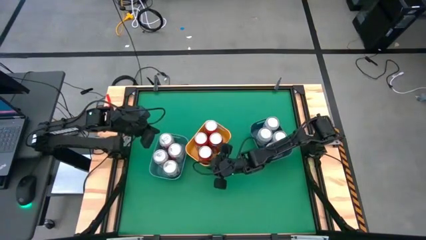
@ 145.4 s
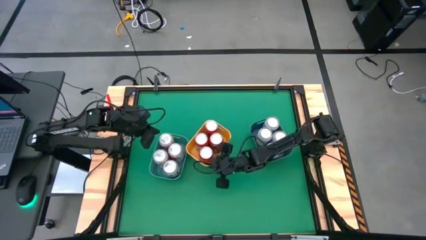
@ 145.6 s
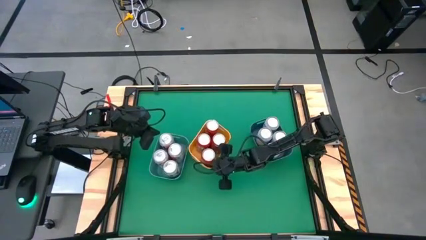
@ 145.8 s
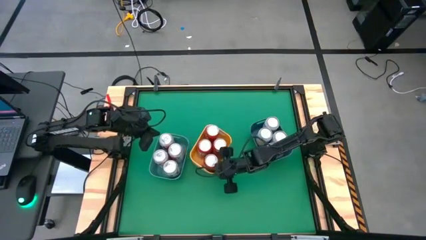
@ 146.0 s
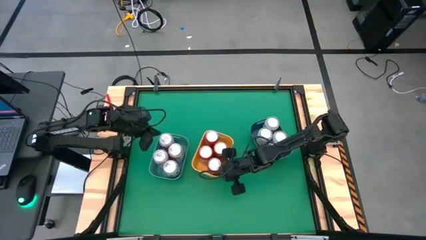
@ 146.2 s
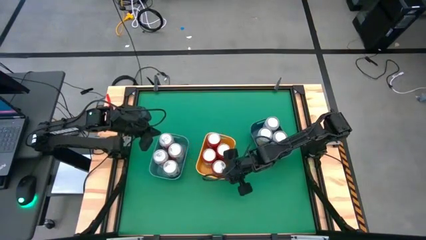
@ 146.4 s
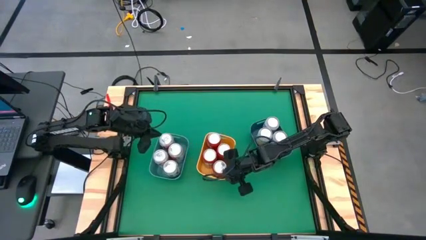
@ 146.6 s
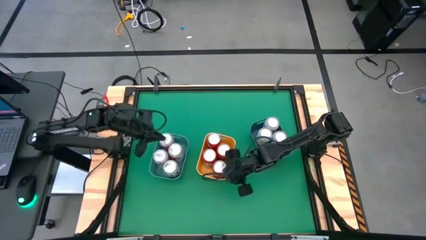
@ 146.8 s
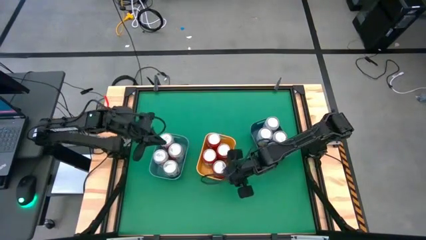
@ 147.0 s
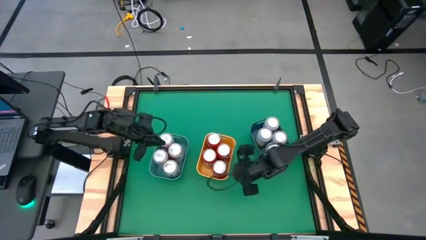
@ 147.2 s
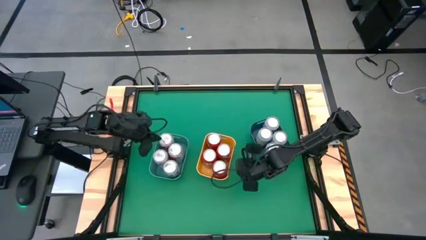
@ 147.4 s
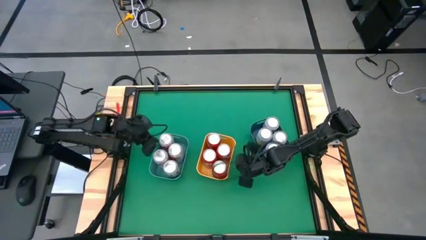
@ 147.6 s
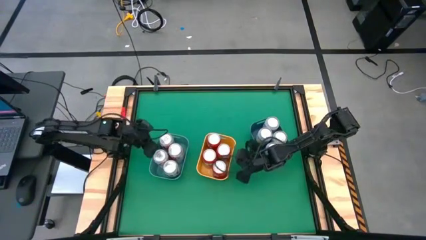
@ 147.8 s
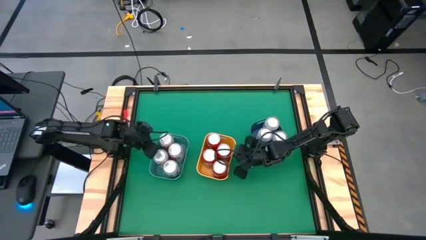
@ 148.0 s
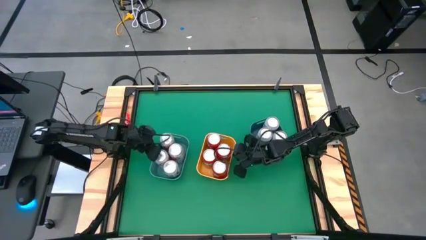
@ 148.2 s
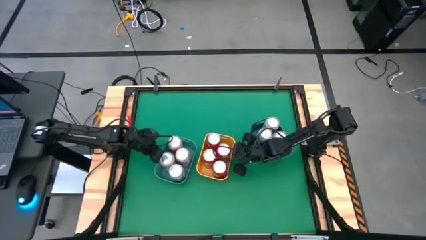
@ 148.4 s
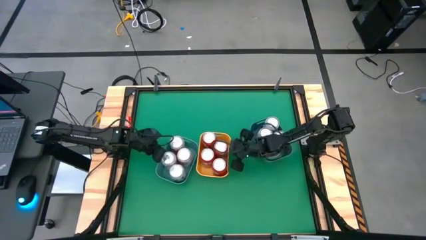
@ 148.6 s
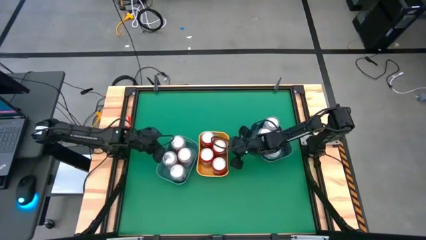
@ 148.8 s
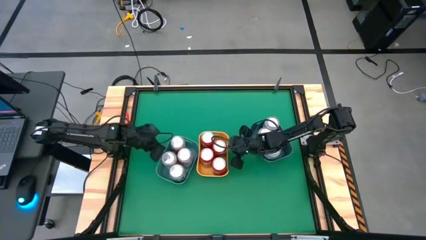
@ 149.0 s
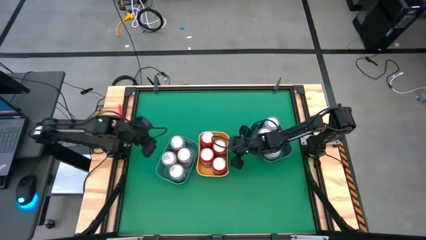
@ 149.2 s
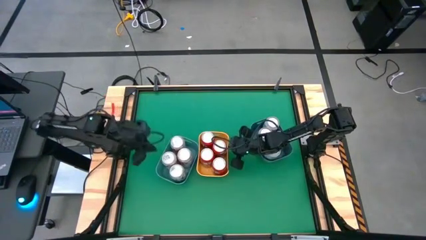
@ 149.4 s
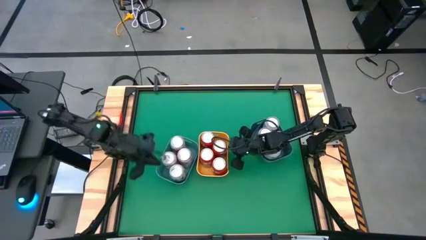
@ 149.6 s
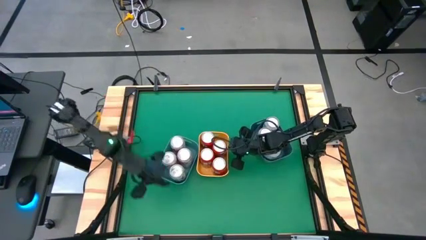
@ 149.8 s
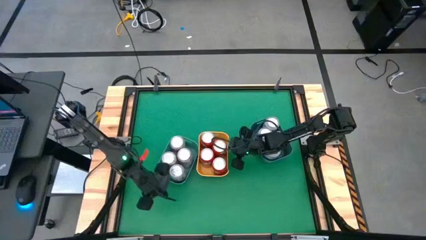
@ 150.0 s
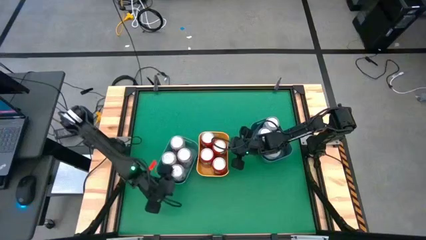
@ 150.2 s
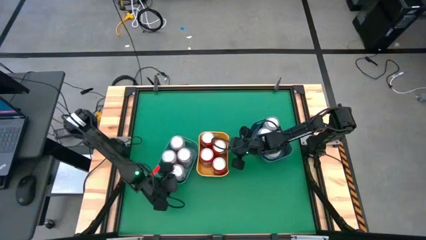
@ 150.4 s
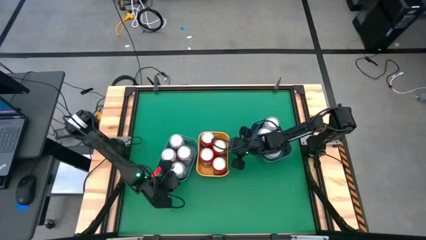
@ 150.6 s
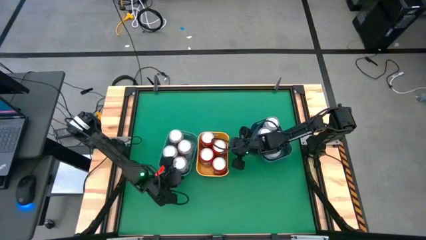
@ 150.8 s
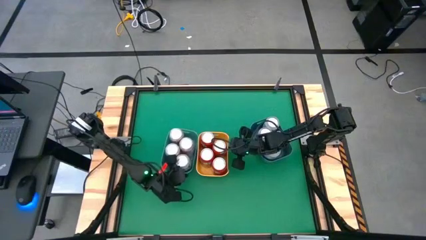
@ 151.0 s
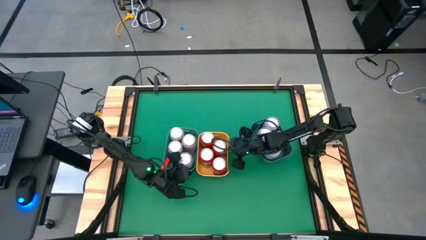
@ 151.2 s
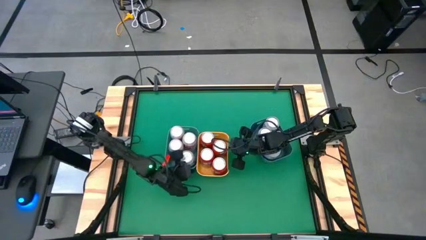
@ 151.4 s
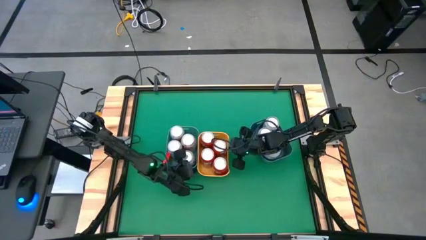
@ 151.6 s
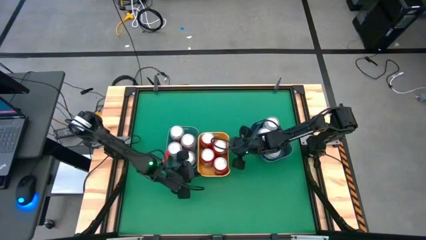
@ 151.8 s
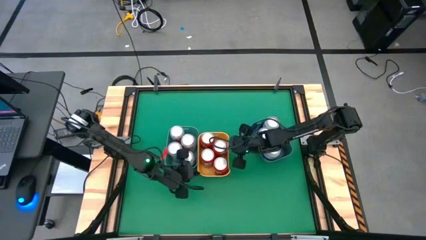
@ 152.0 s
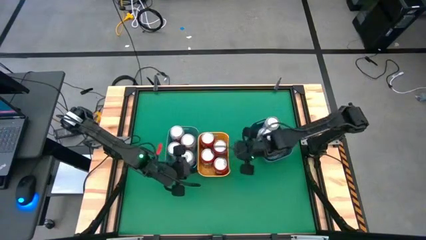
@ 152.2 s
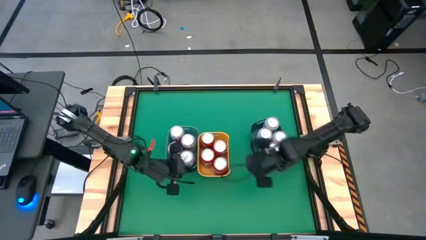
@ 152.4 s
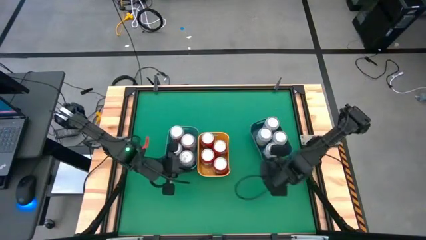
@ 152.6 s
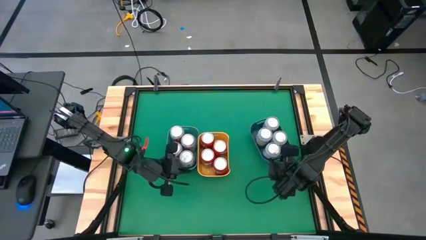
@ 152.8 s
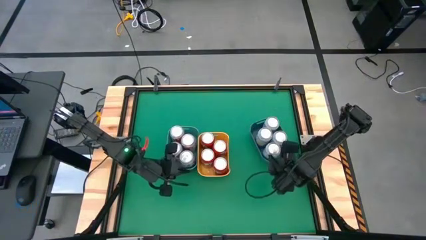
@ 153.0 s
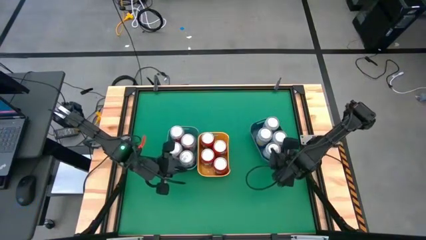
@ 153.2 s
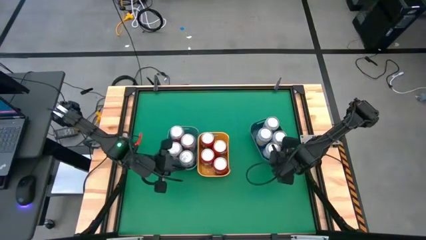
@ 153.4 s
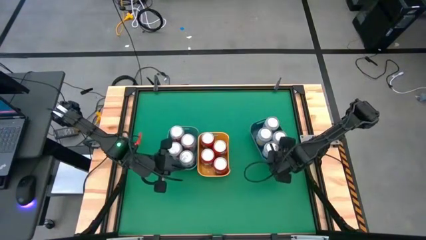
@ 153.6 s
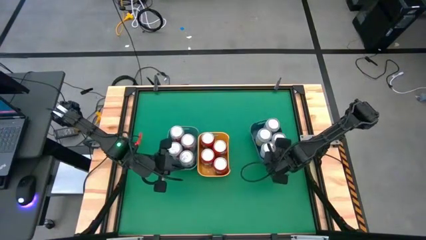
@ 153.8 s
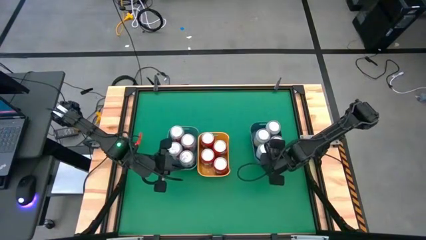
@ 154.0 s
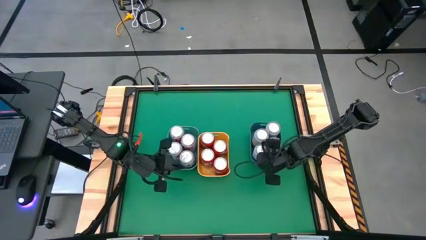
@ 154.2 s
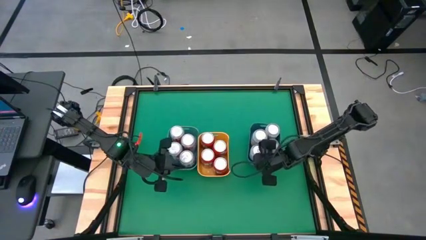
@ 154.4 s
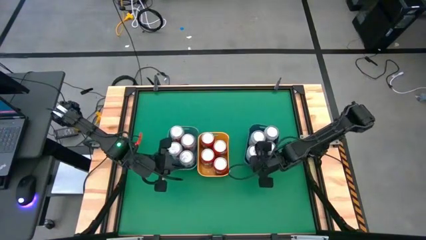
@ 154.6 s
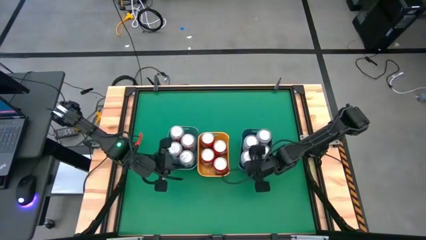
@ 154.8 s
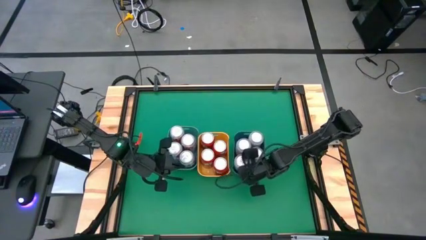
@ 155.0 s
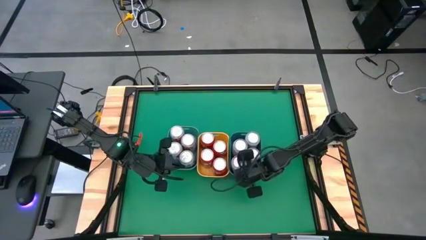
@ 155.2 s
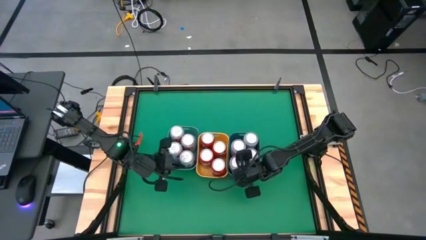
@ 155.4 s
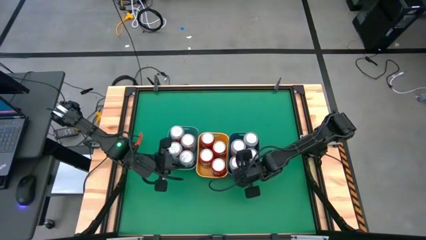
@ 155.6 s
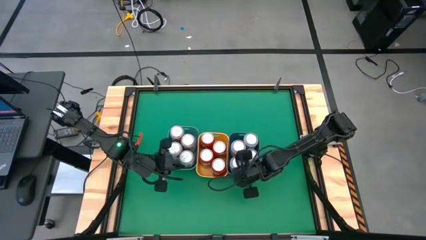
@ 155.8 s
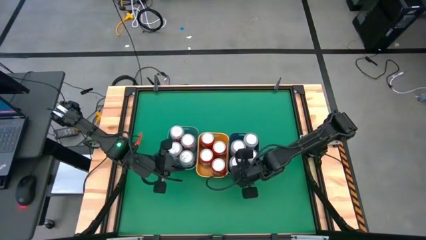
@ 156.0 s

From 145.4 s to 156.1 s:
Task: Sort soda cans
Adjust the bins

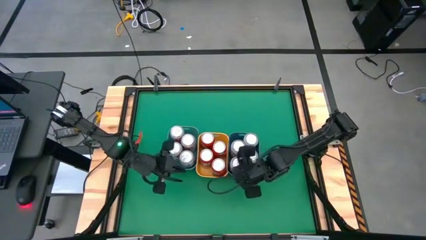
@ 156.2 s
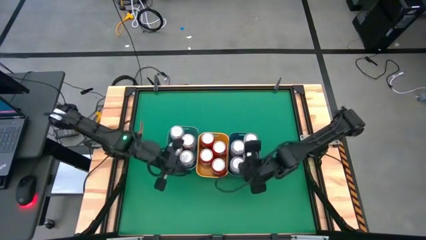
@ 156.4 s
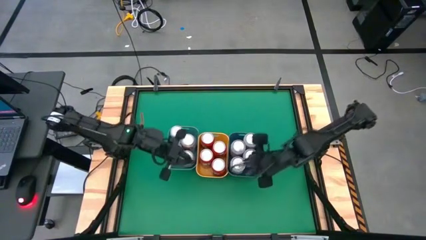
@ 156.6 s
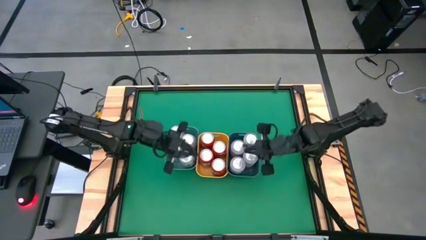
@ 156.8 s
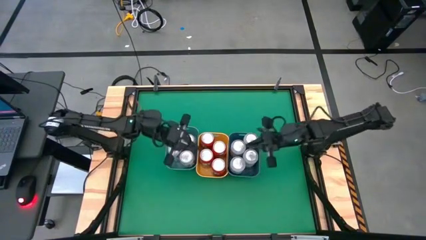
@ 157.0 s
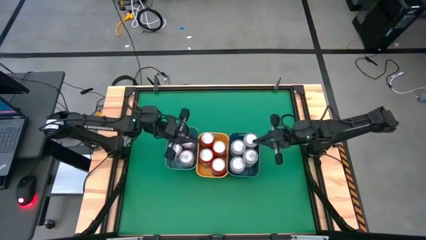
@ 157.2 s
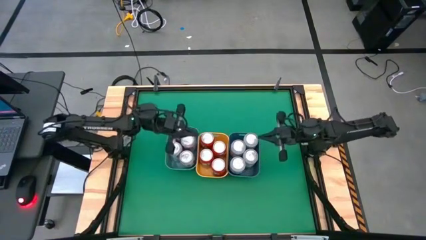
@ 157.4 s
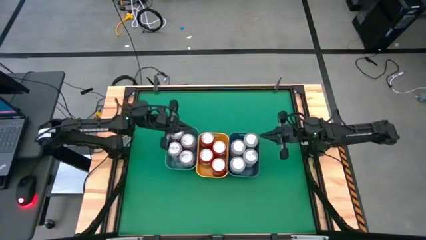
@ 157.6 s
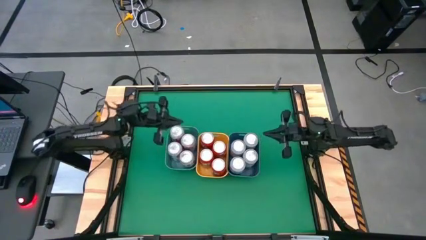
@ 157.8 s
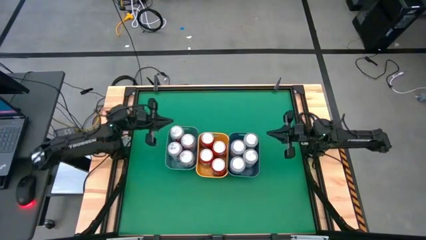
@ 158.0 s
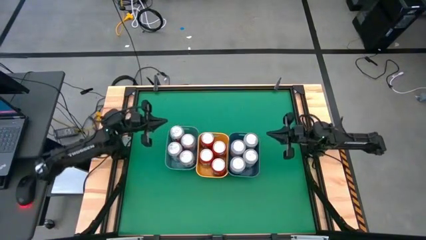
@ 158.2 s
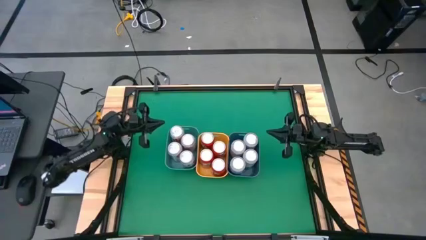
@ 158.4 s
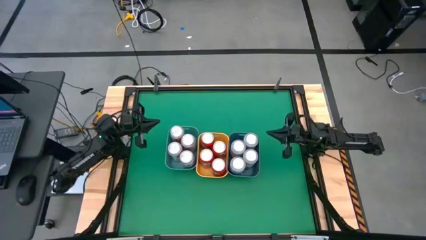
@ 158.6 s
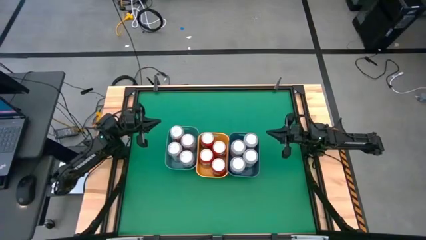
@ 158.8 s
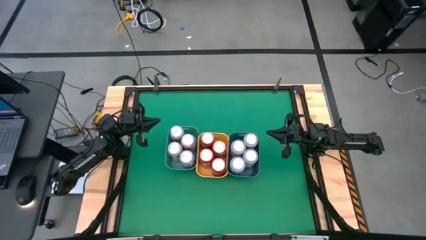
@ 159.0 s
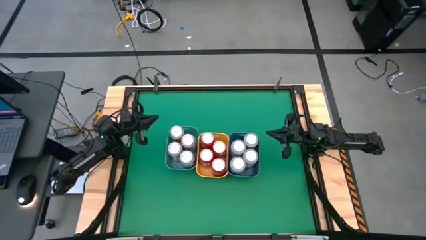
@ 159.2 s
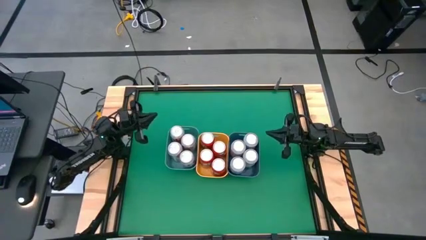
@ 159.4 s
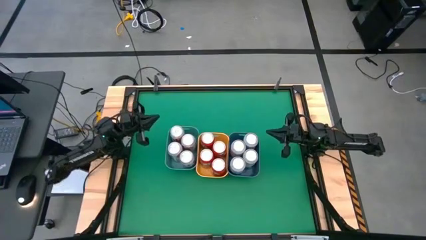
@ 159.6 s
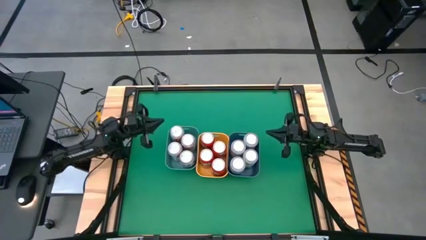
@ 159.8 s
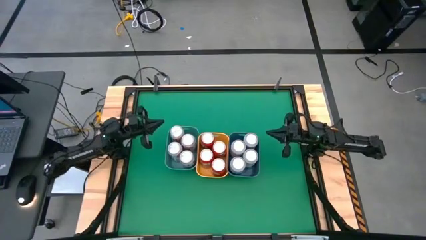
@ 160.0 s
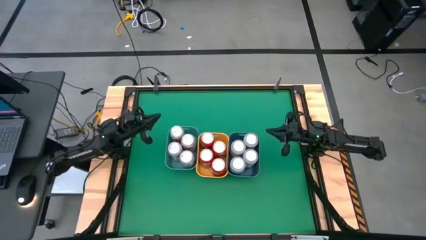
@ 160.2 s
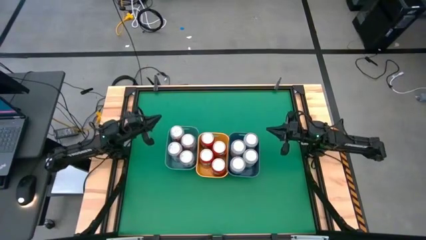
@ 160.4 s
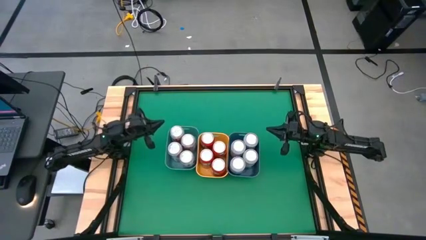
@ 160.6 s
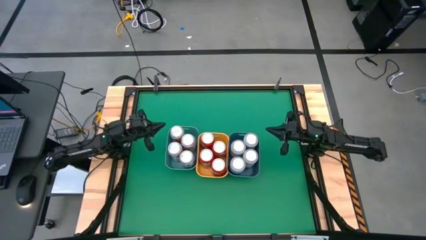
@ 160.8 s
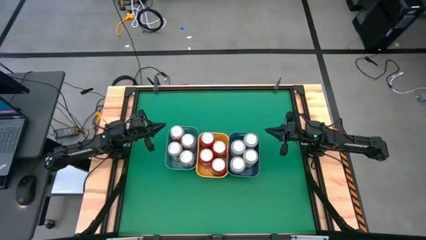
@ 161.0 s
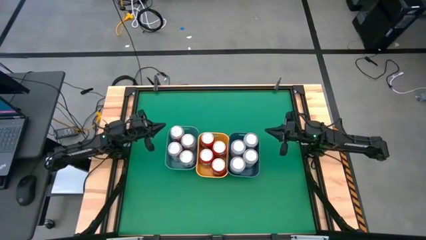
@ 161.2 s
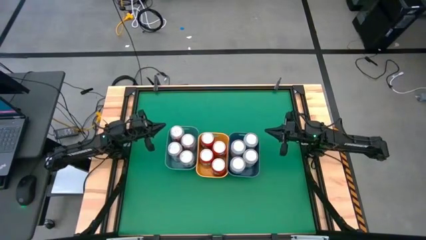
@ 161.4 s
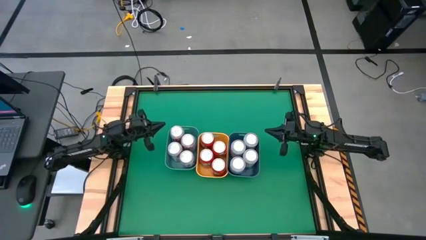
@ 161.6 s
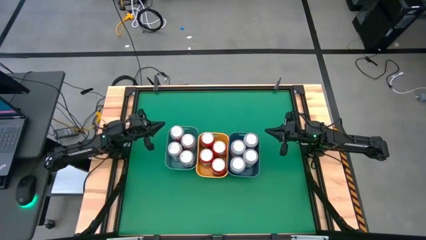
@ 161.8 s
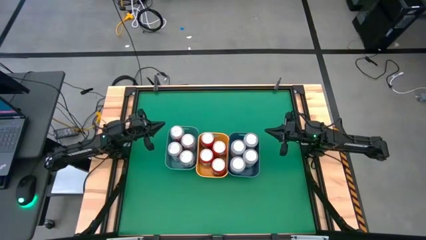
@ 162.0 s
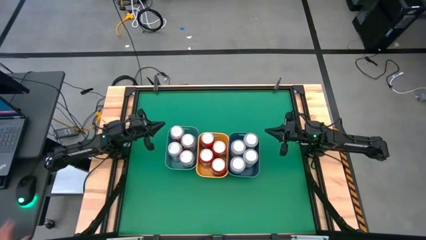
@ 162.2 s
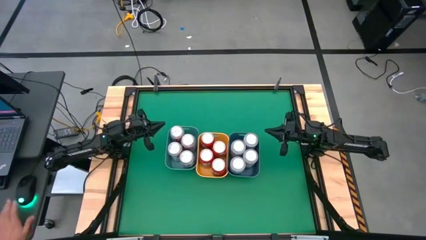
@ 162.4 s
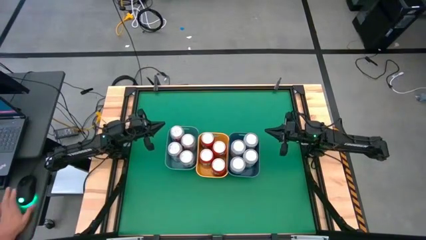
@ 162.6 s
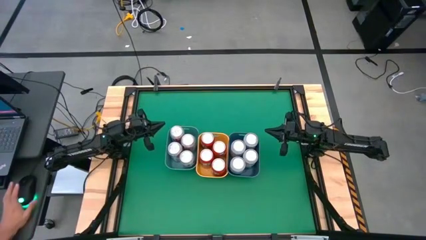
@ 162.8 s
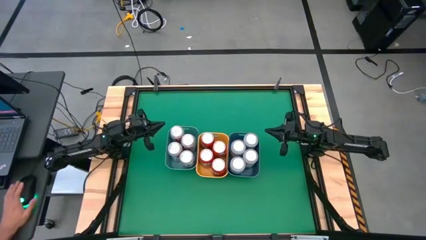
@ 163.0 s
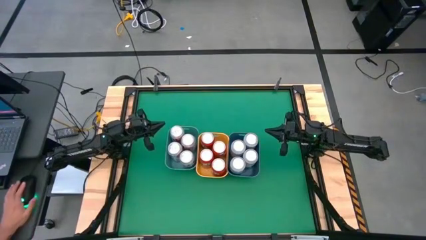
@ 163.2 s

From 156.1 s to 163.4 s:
Return to Home Position
